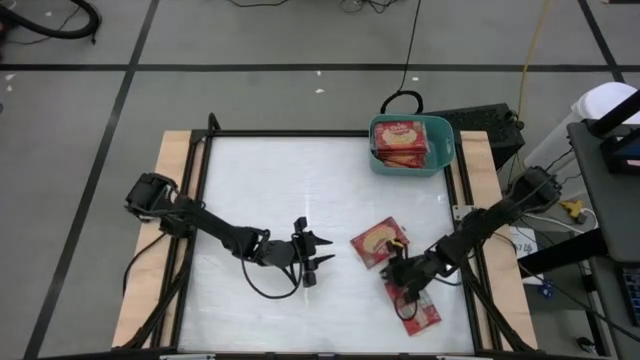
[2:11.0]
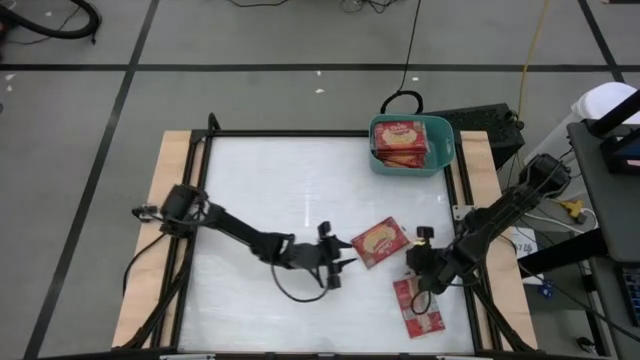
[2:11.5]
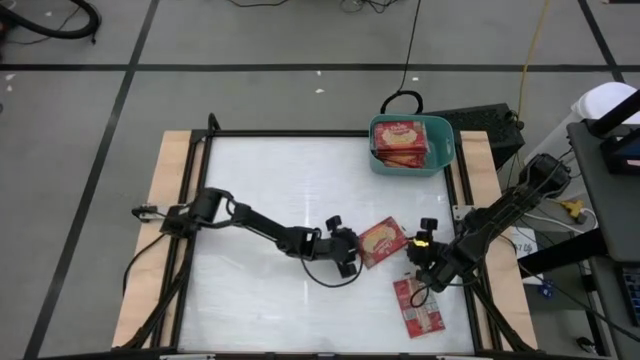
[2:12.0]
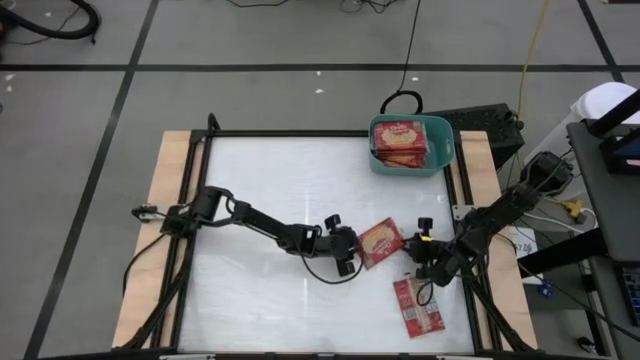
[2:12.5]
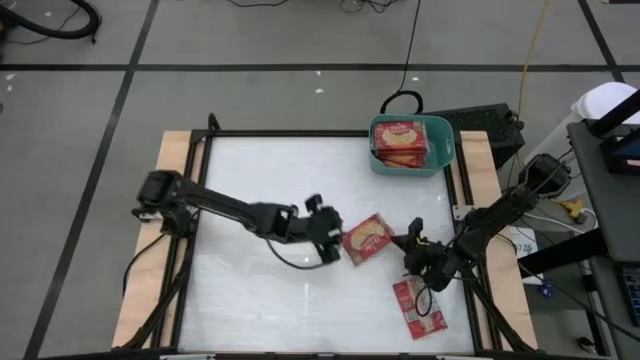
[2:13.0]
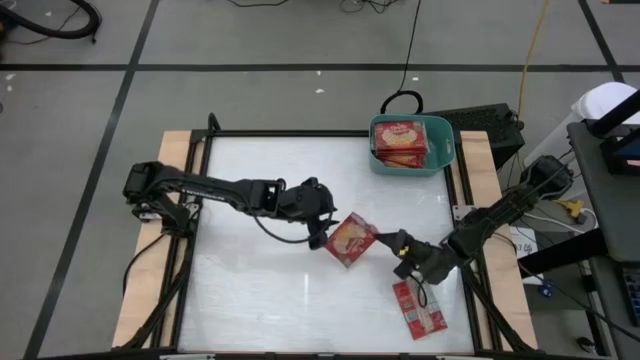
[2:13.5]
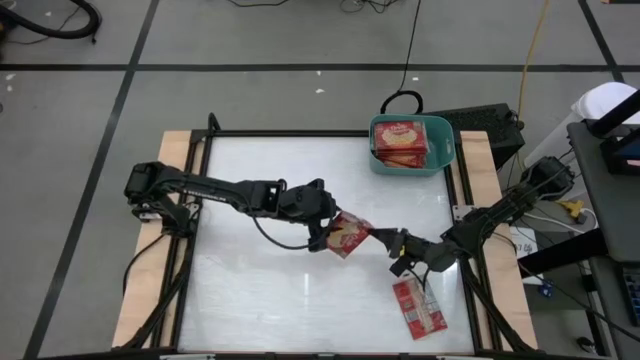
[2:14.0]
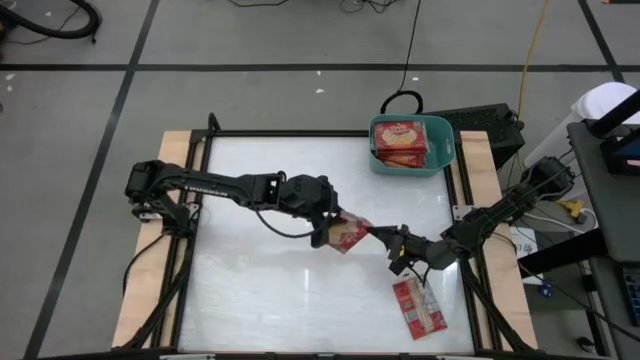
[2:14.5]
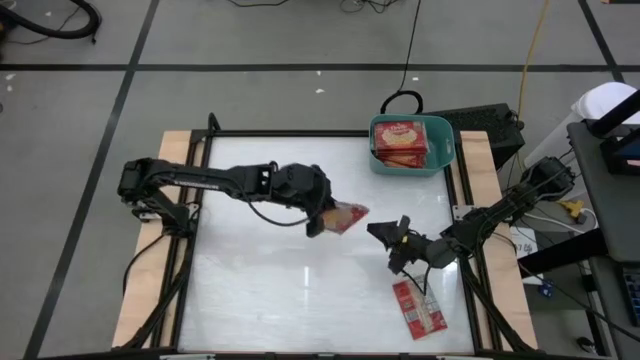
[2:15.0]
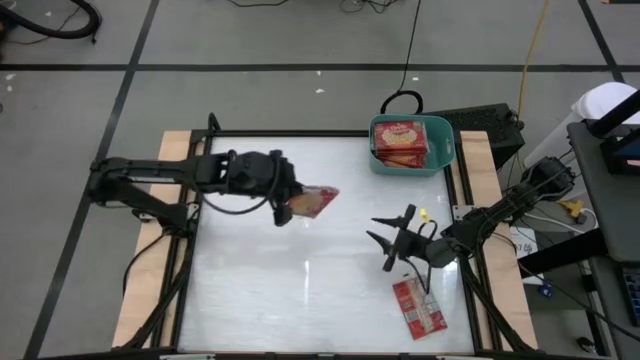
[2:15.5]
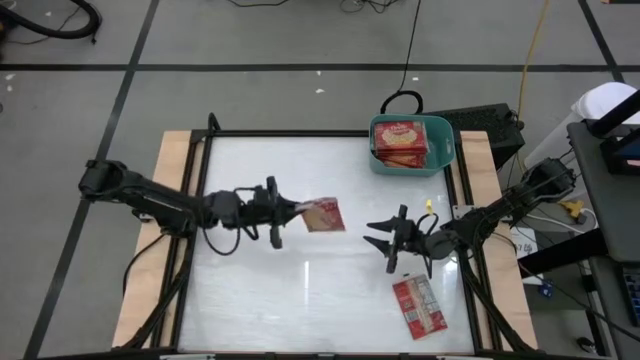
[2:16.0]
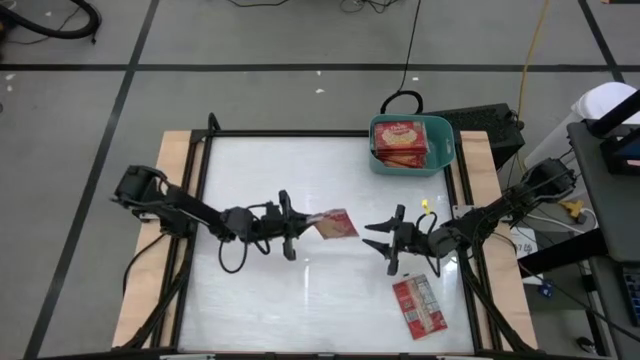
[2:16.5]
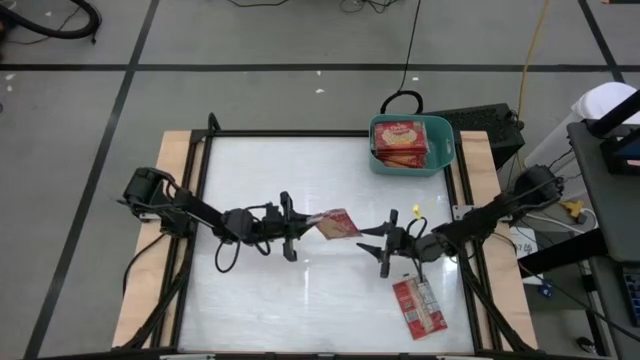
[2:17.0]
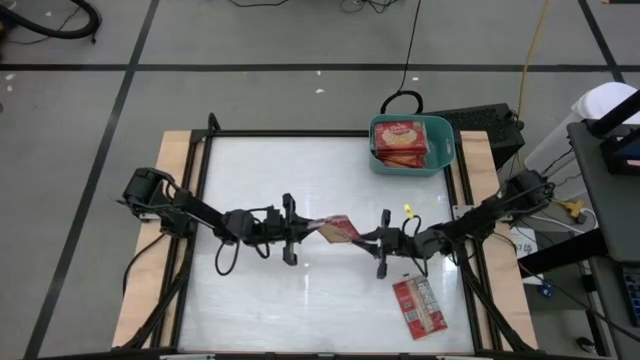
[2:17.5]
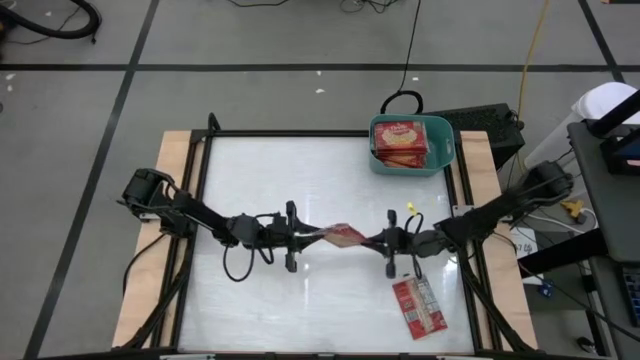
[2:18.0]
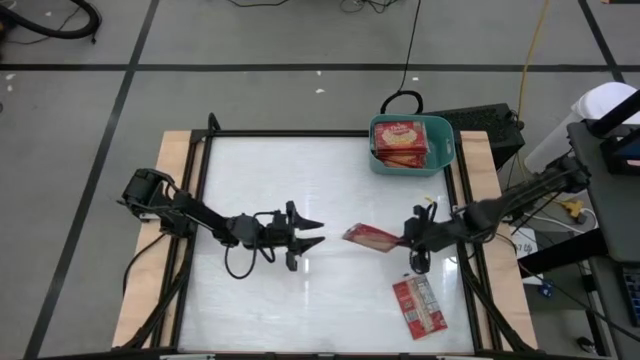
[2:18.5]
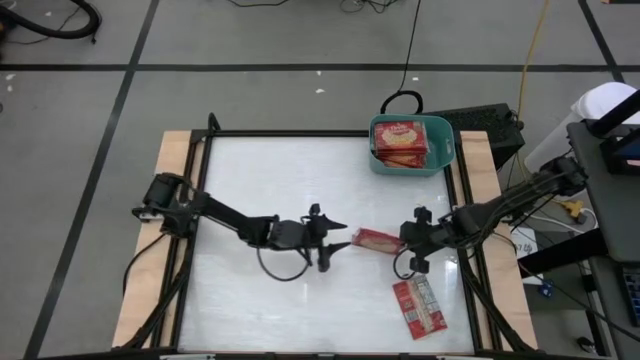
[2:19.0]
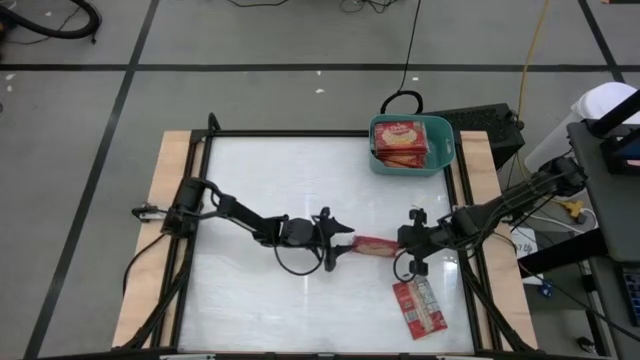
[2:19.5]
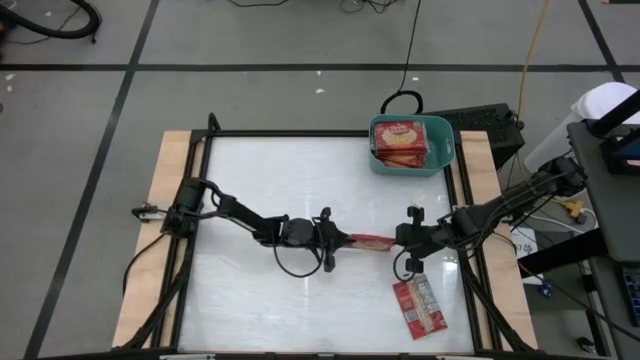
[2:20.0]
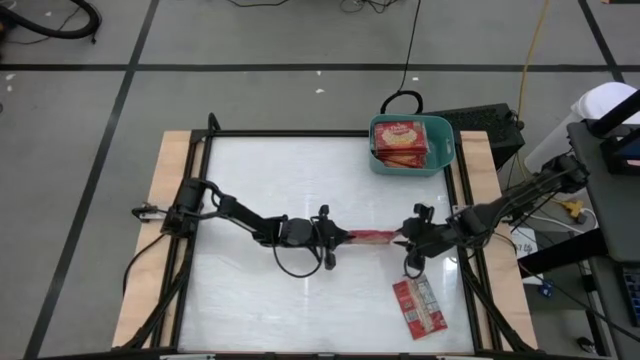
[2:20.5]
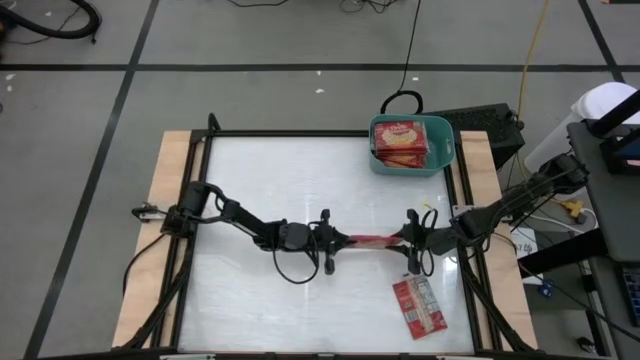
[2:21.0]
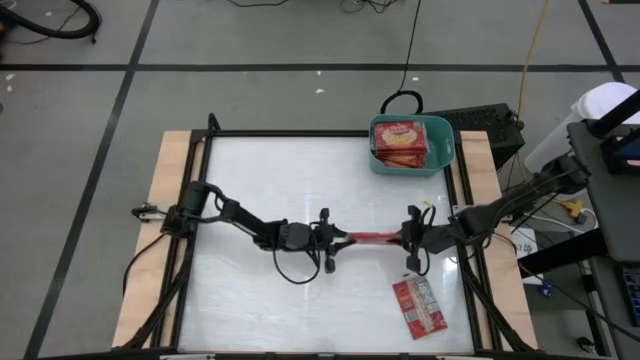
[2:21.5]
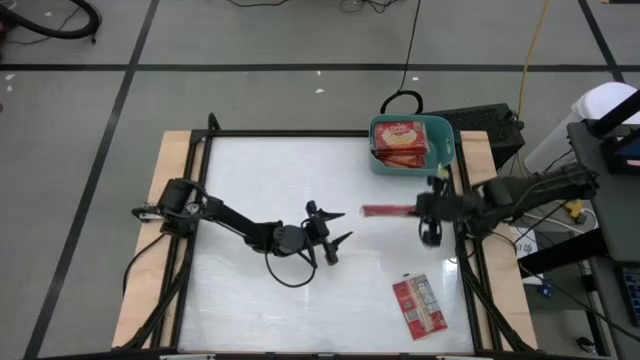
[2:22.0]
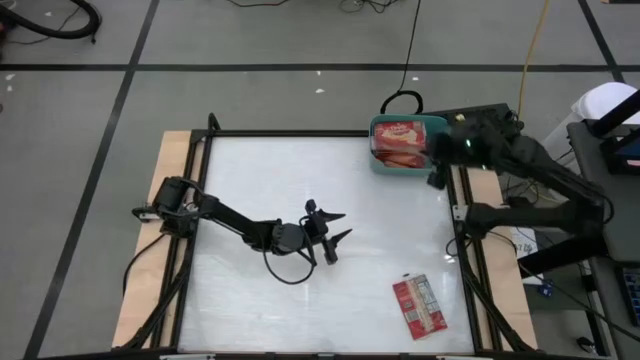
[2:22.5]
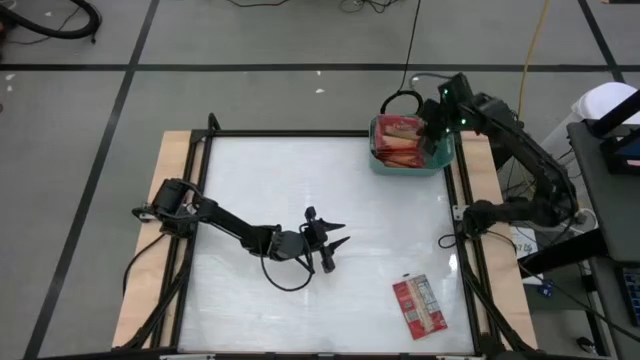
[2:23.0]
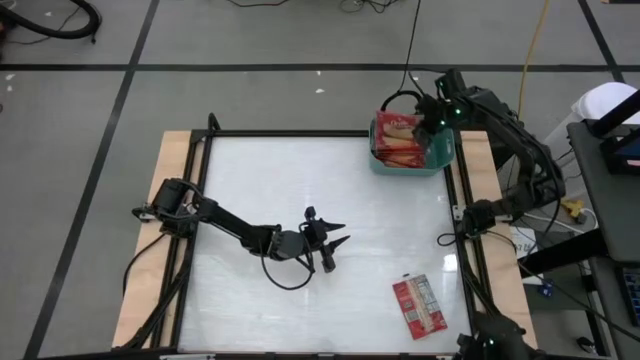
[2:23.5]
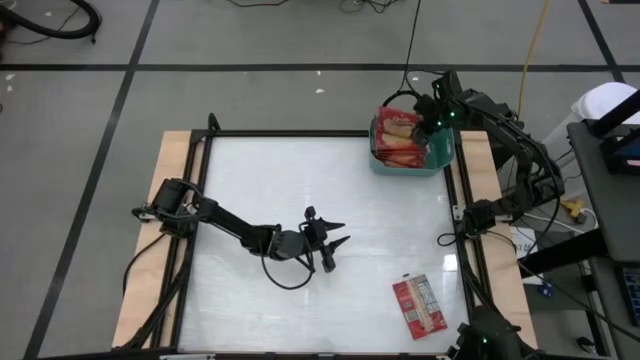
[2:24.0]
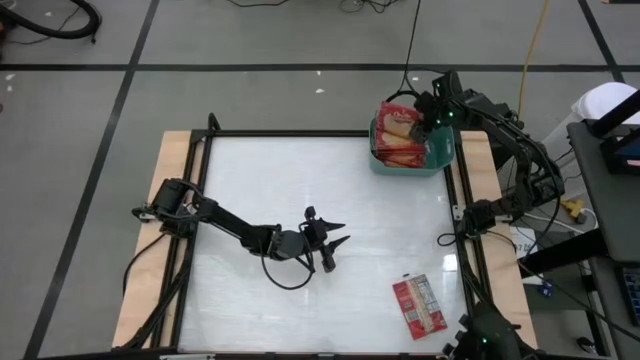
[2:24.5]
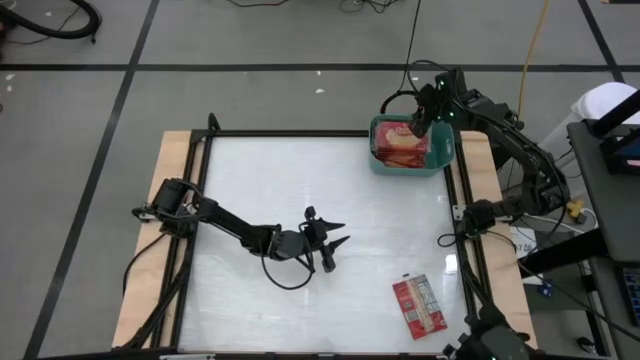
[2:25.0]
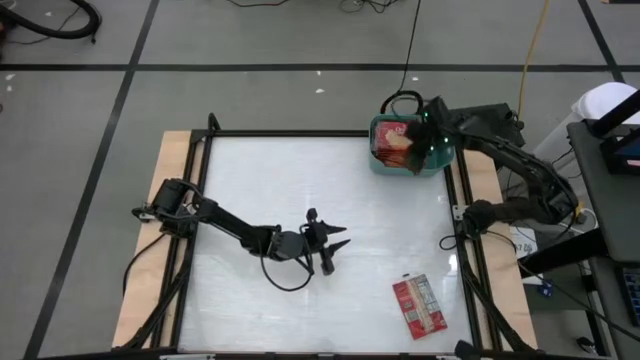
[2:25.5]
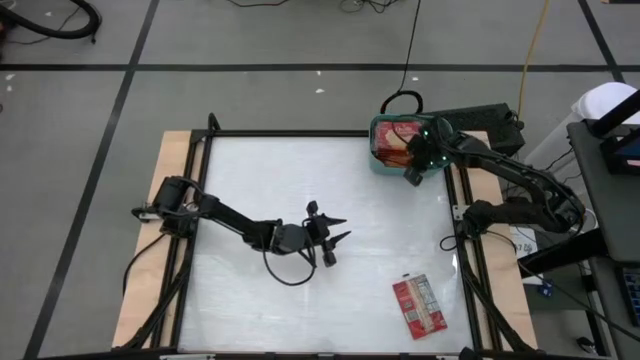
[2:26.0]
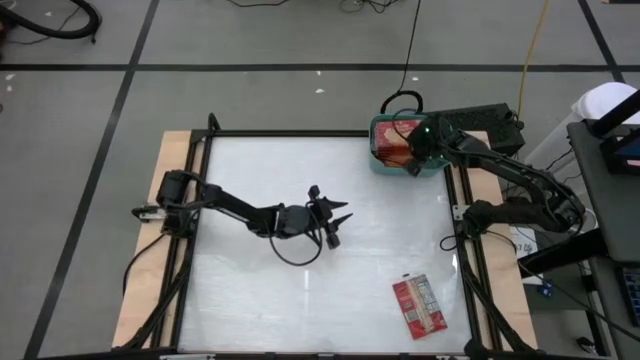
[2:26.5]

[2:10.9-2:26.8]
Task: Sort popcorn bags into baskets
Put the red popcorn bag into the green bin

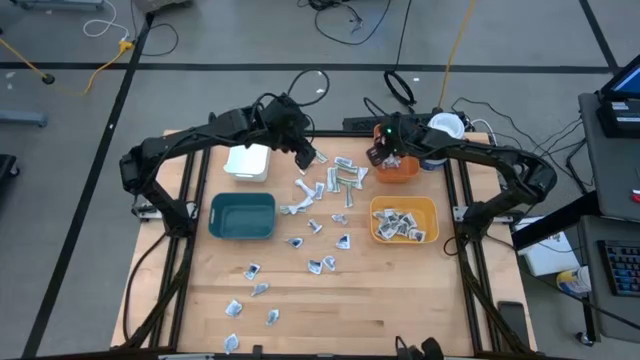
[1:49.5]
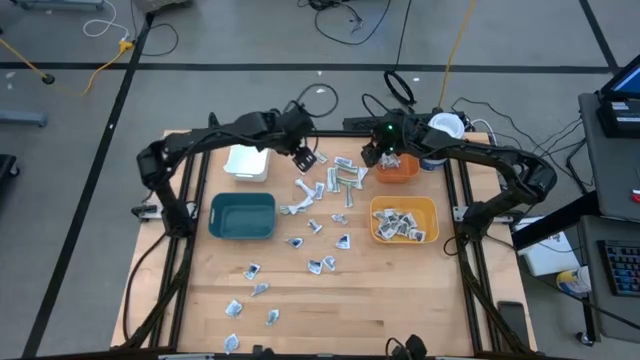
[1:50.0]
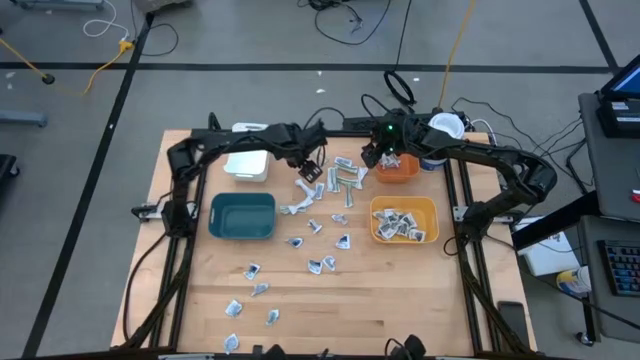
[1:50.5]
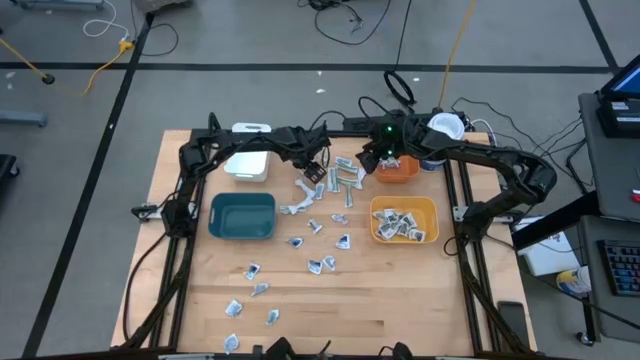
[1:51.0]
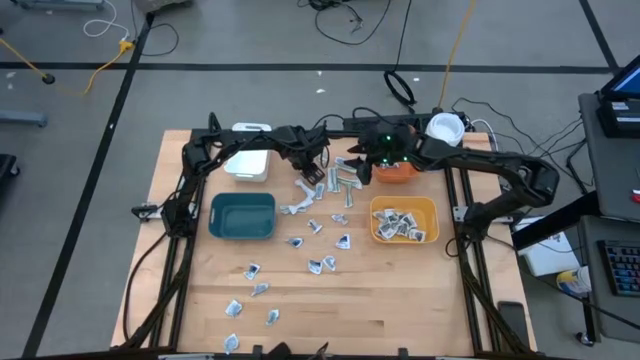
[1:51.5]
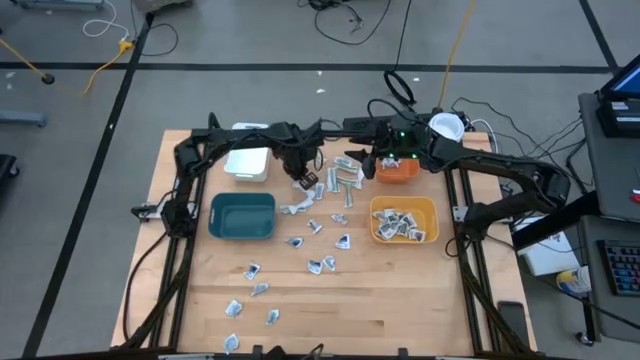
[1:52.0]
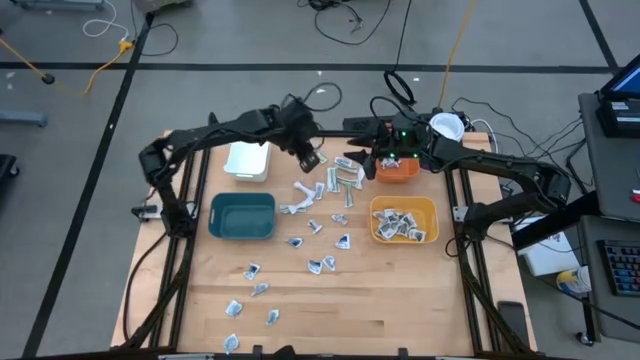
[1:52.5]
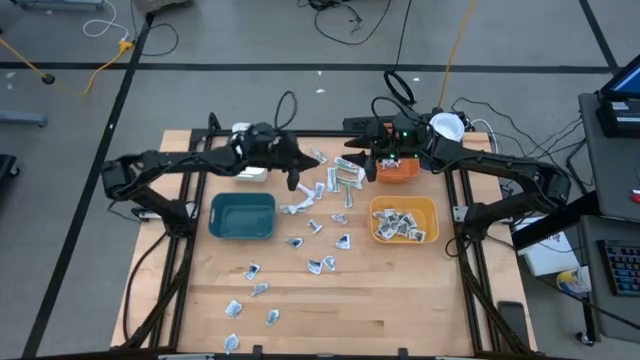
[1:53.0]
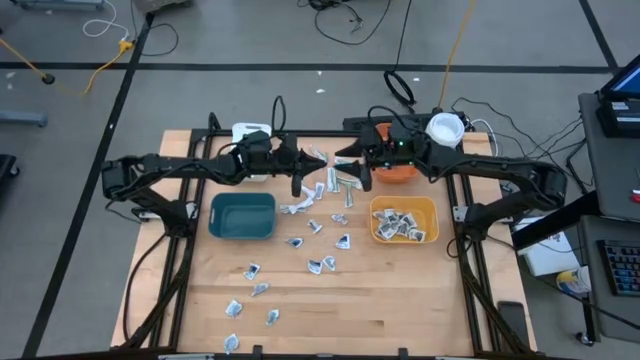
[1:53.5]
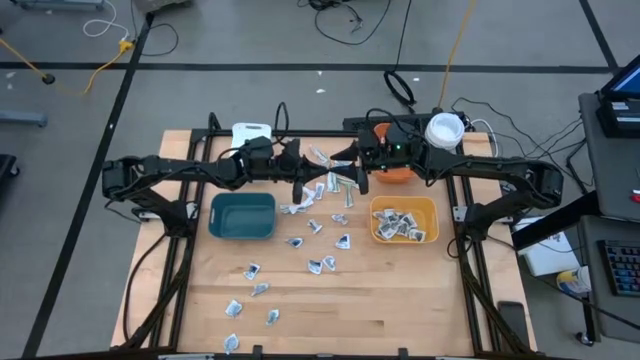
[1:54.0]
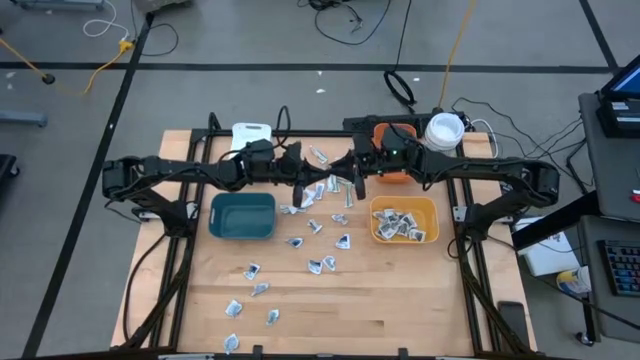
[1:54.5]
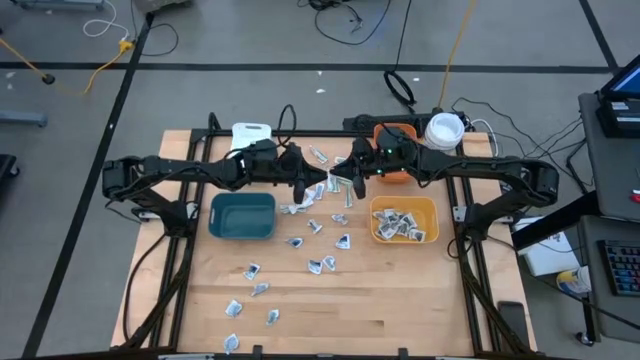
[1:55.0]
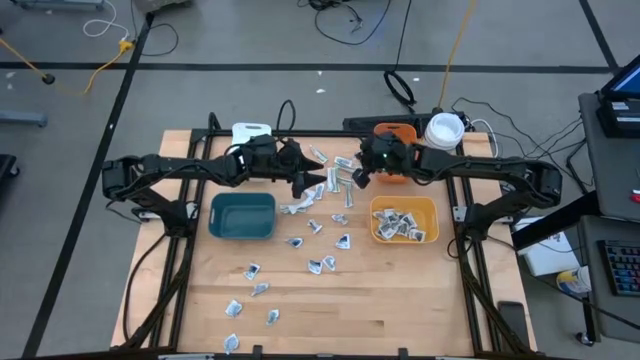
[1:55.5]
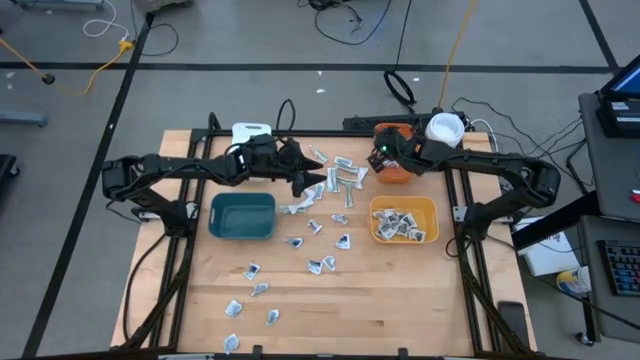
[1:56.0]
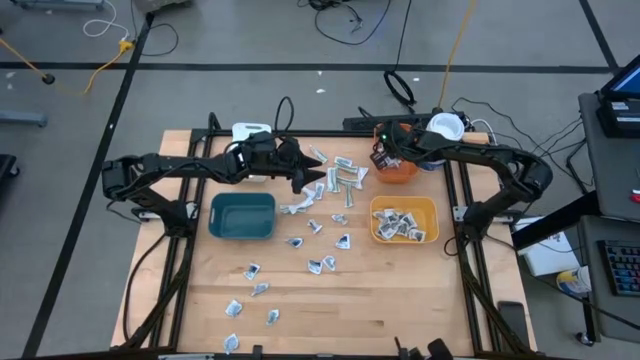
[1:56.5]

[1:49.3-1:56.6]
Task: Pick & Place First Aid Supplies
Put the antibiotic ointment into the orange bin
